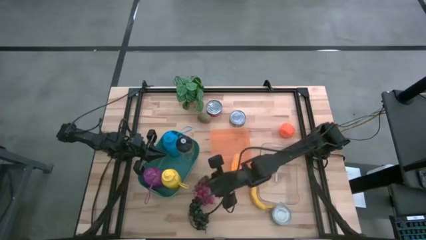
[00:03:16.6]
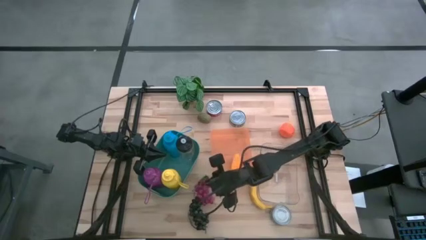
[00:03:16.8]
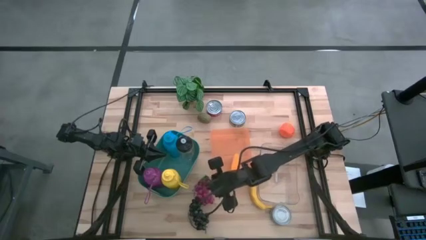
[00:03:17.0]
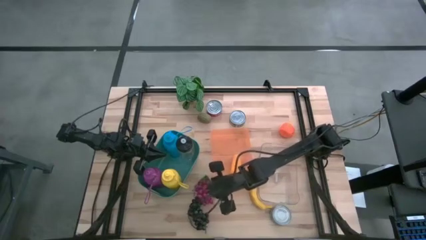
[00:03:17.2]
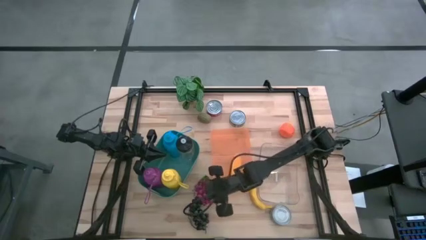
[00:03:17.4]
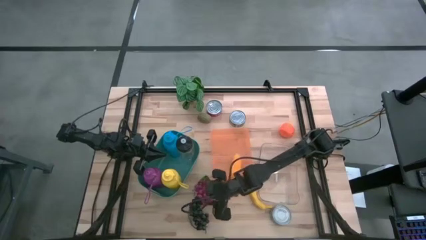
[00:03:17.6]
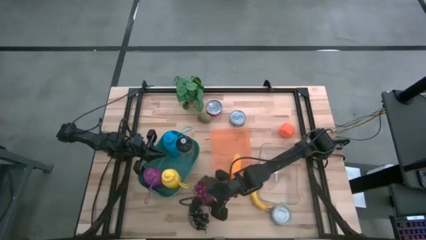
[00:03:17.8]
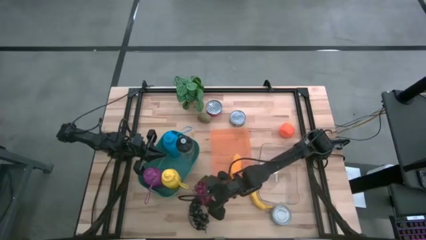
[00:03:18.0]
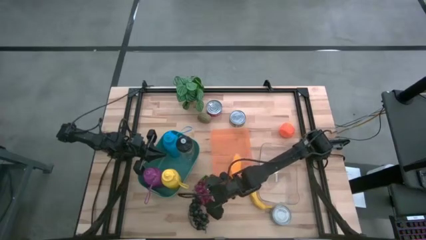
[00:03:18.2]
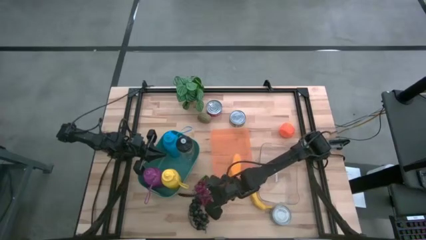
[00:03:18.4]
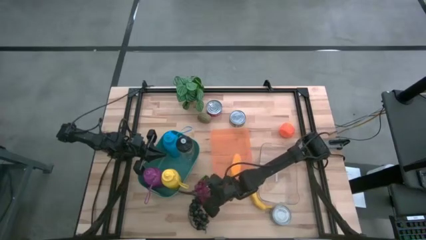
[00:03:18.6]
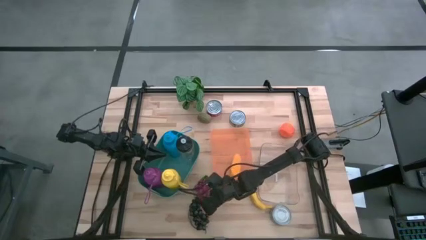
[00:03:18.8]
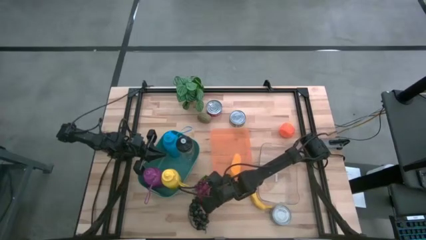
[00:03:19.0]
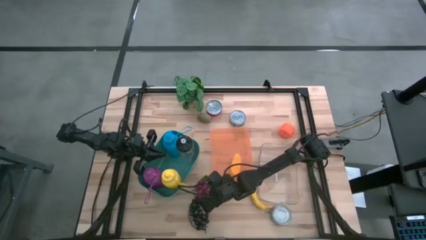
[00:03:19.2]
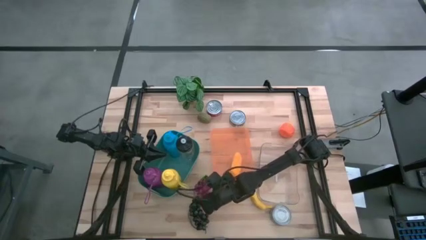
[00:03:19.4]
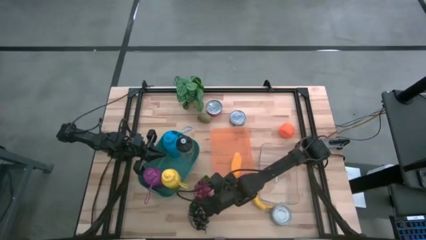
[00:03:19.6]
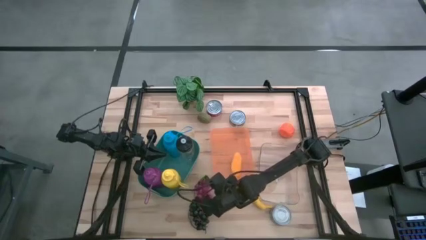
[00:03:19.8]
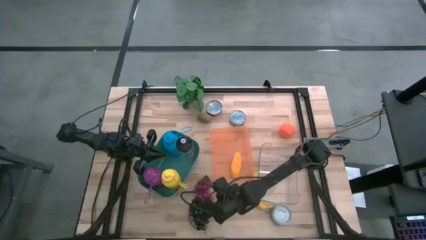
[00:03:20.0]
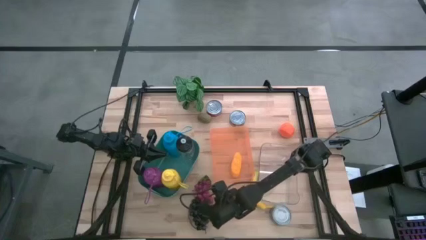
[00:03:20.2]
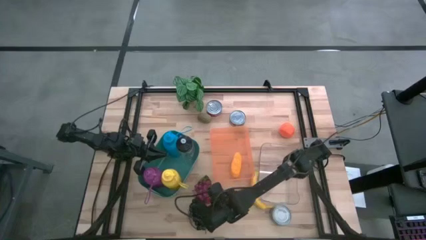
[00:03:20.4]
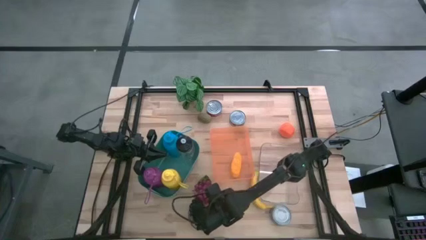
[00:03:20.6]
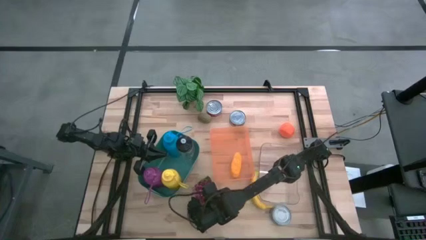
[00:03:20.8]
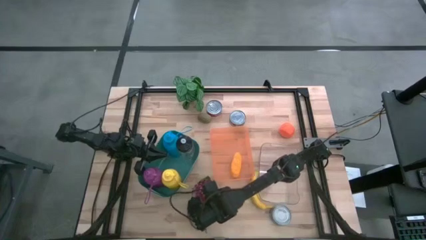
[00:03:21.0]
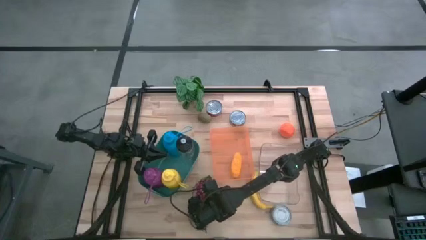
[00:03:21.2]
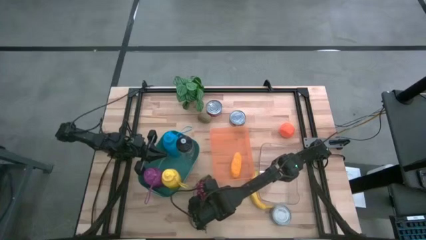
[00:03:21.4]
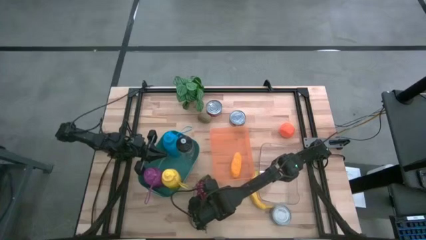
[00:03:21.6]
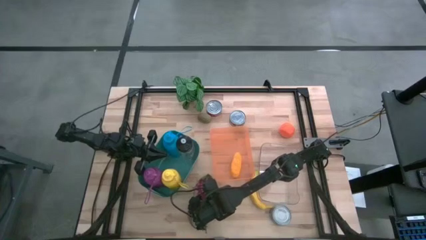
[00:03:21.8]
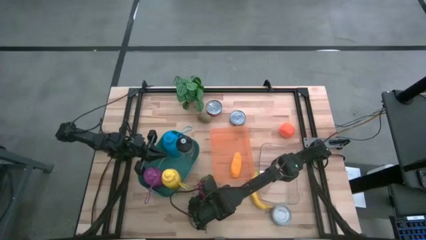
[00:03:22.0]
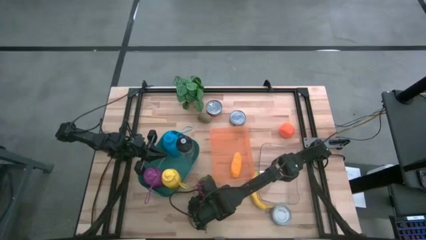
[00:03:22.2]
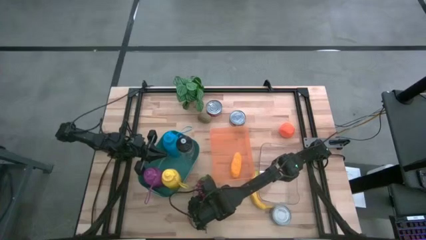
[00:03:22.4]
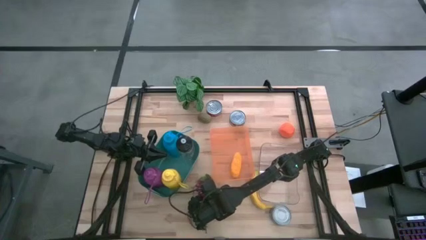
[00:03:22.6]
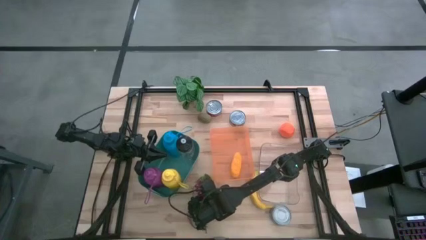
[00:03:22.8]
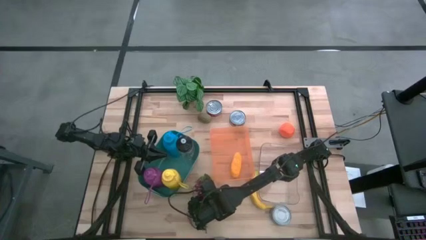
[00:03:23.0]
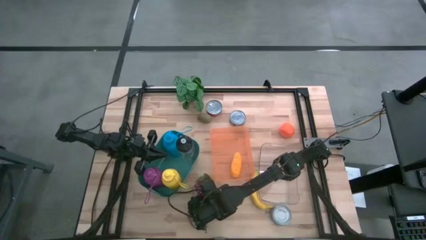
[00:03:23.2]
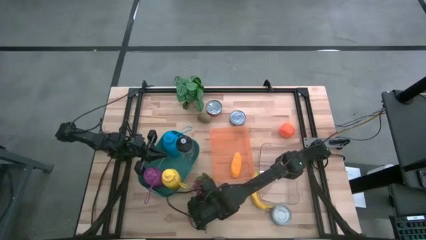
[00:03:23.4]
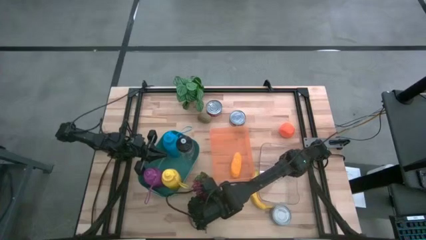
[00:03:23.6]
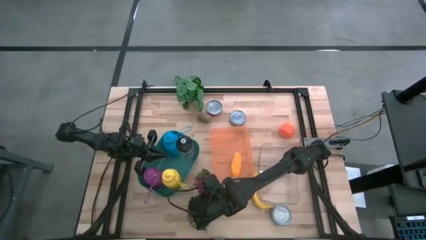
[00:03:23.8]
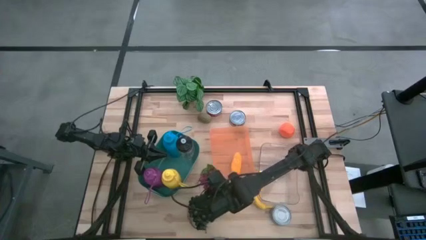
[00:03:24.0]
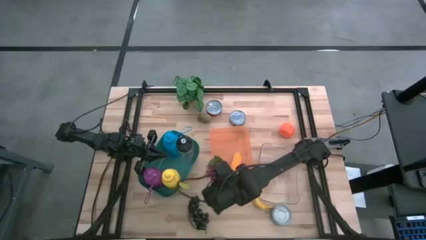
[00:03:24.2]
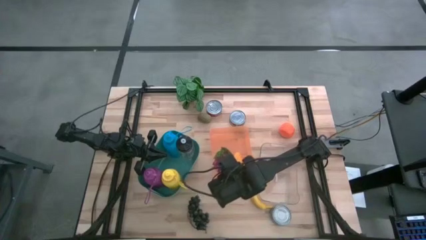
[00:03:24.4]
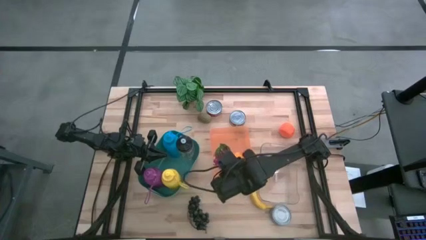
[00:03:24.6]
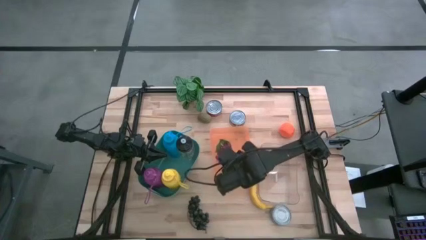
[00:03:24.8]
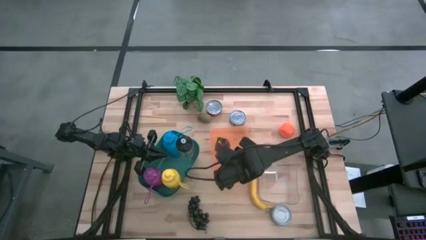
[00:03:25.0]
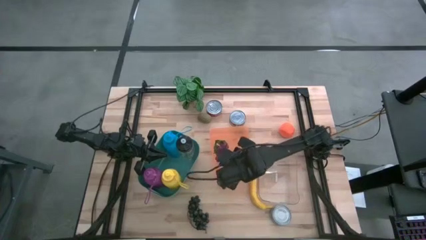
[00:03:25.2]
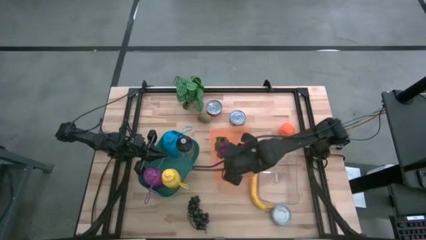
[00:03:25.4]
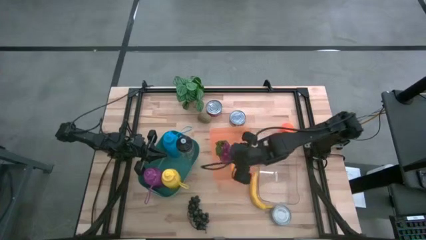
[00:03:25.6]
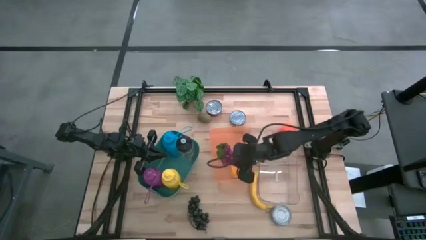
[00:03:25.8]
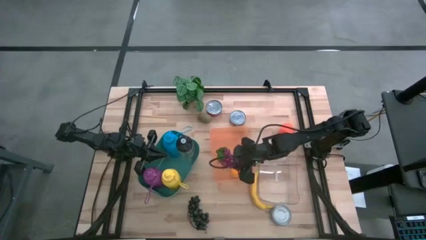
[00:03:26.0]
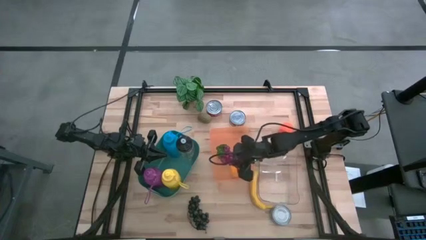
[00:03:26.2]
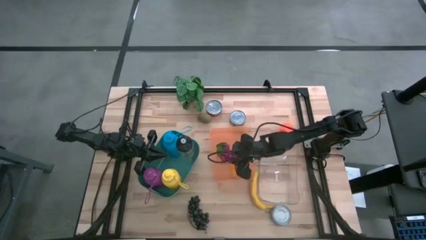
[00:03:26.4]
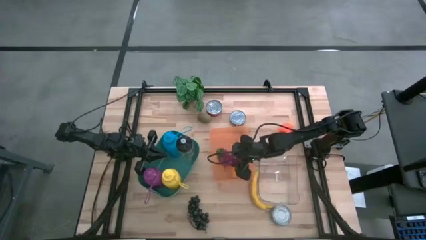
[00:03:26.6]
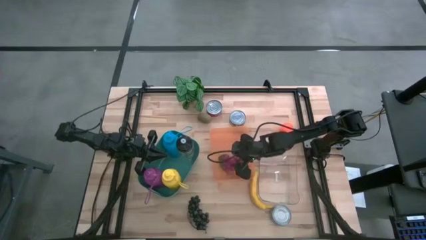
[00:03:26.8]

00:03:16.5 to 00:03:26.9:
Task: Pick & Place Food Item
Put the purple grapes into the orange bin

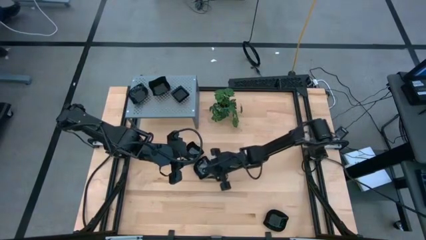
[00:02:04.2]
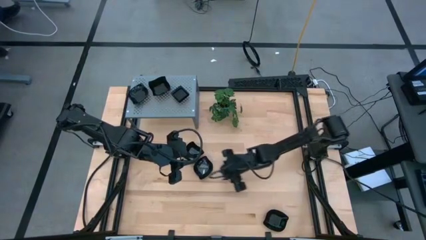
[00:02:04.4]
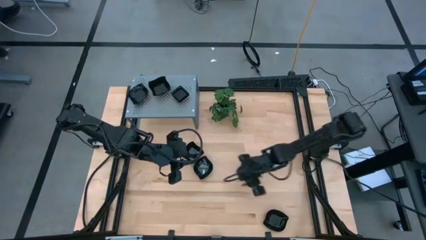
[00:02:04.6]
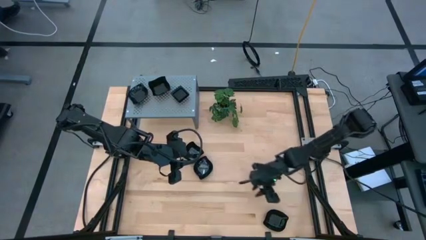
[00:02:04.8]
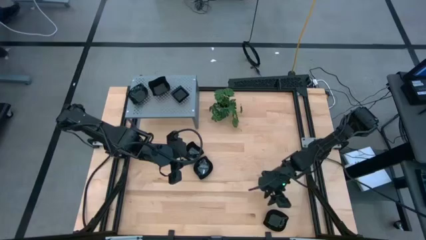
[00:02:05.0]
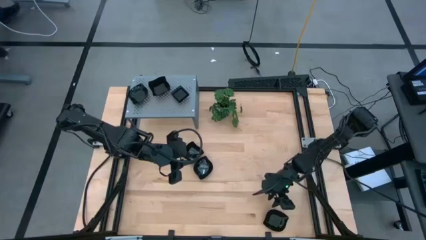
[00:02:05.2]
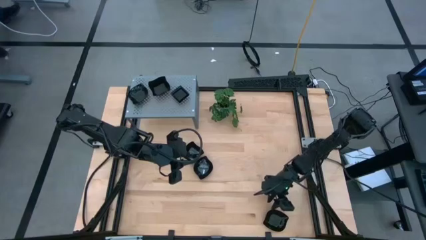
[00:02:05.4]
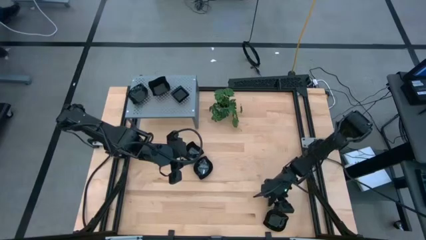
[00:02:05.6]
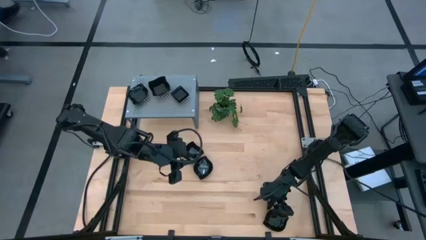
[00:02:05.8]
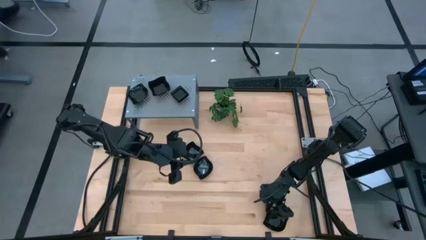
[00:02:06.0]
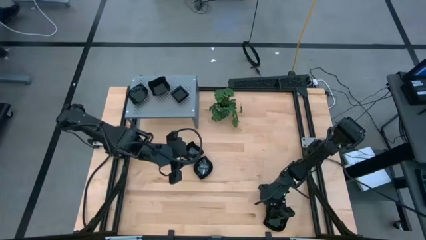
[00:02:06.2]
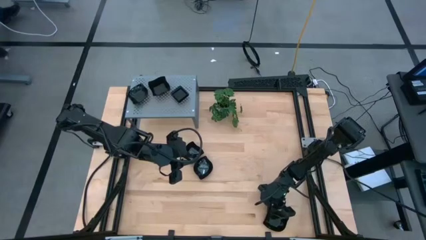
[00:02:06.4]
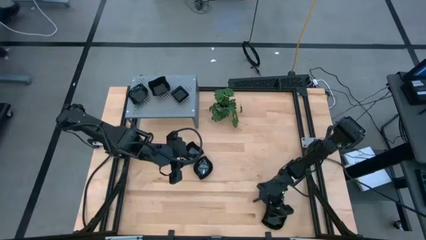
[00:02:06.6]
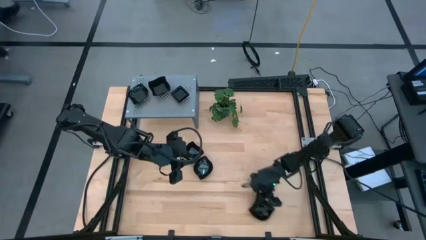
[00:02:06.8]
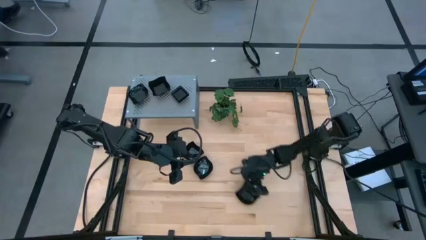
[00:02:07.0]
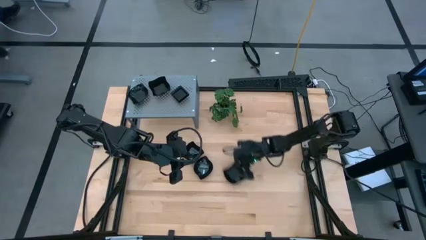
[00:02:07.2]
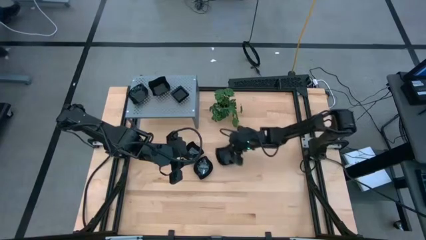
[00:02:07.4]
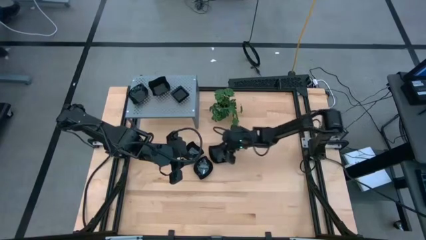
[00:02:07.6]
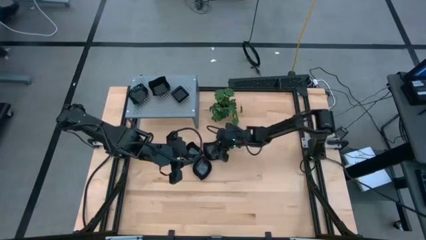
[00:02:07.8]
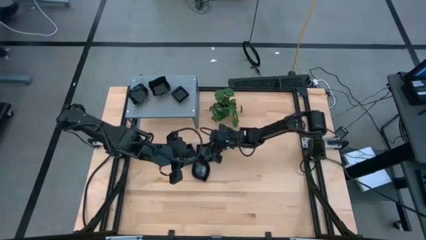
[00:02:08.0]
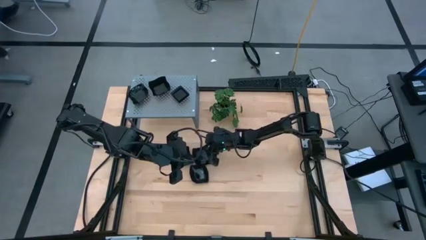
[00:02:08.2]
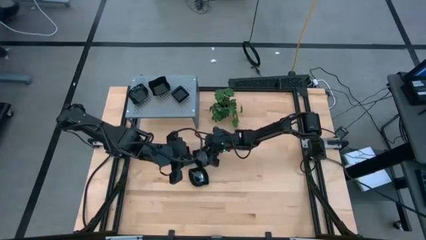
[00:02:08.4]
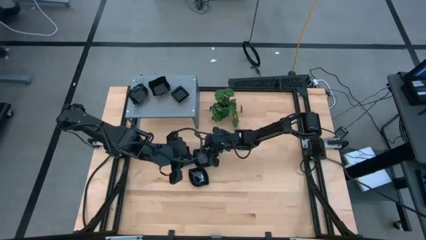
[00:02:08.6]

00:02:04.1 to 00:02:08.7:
Task: Pick & Place Mini shaped plates
Move the black leaf shaped plate to the center of the table
